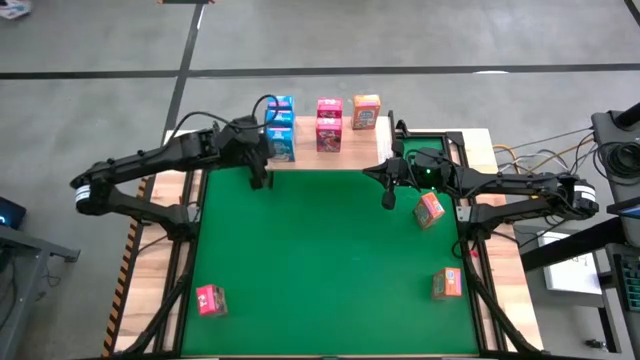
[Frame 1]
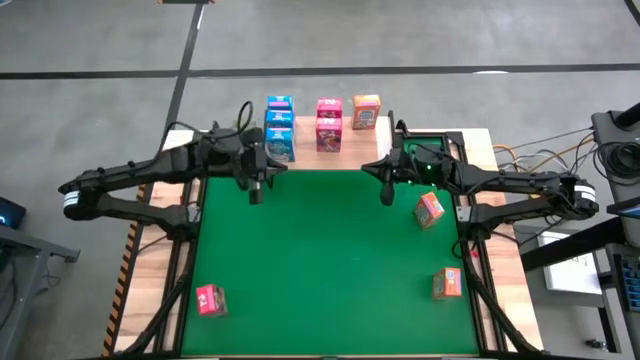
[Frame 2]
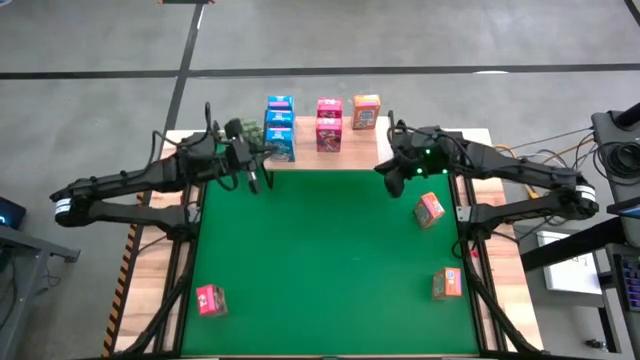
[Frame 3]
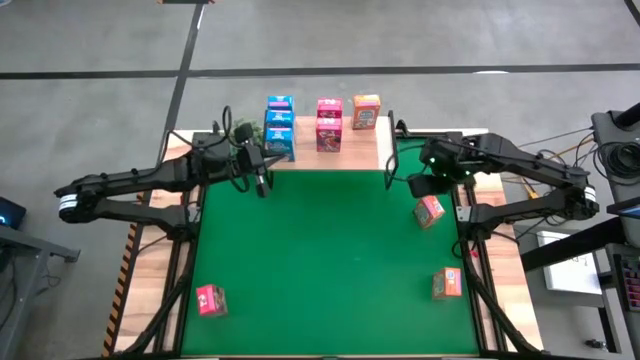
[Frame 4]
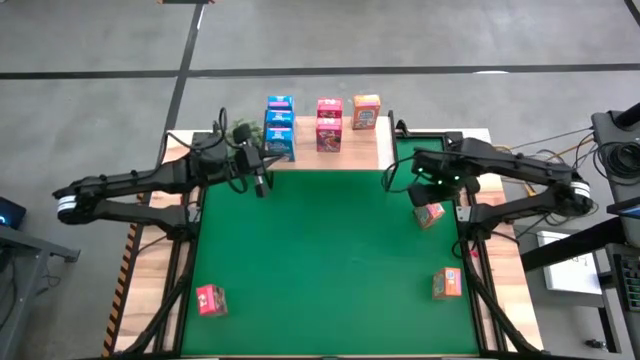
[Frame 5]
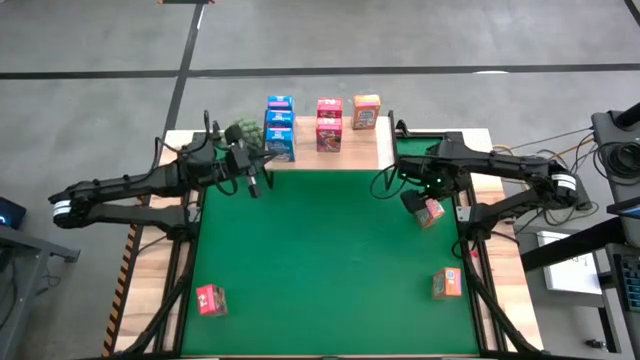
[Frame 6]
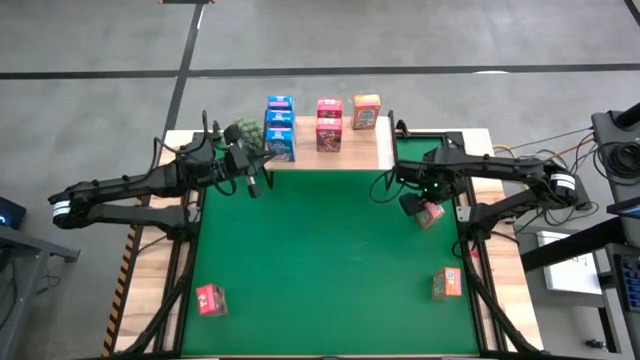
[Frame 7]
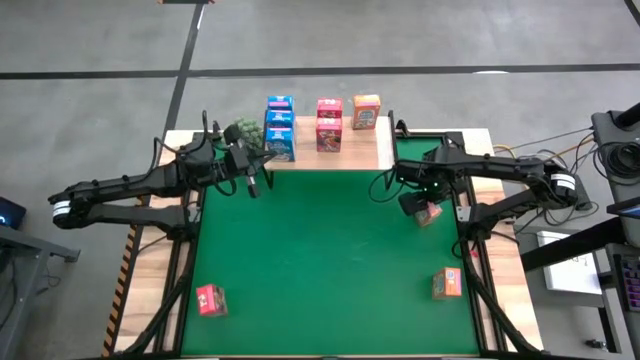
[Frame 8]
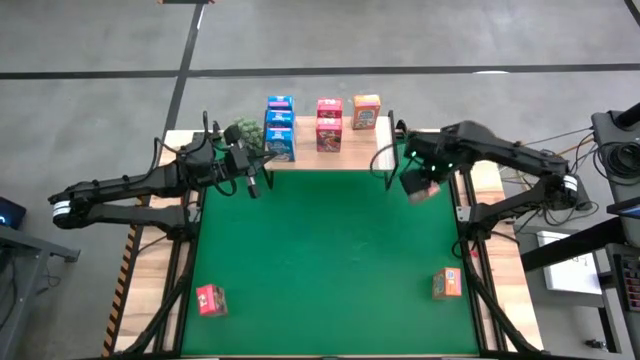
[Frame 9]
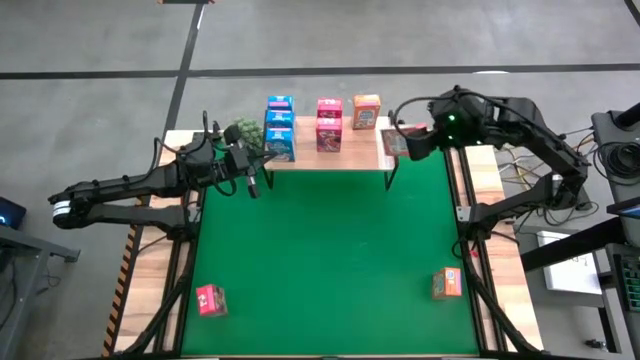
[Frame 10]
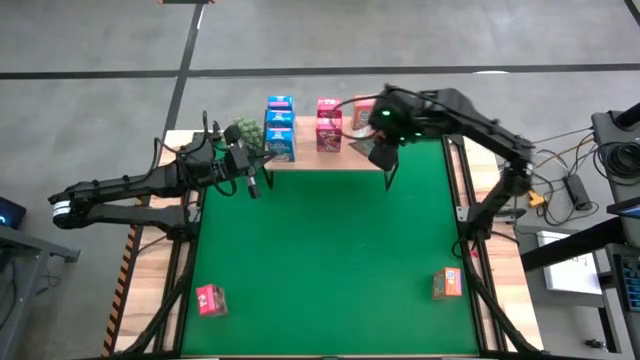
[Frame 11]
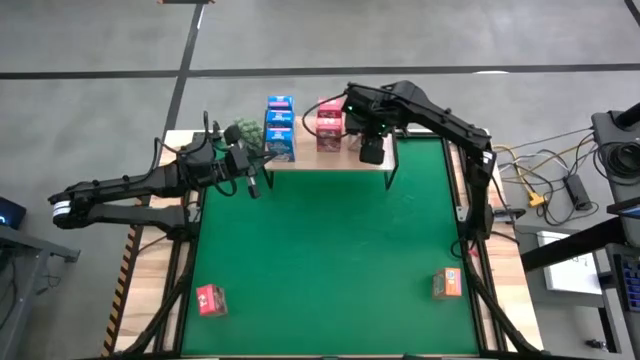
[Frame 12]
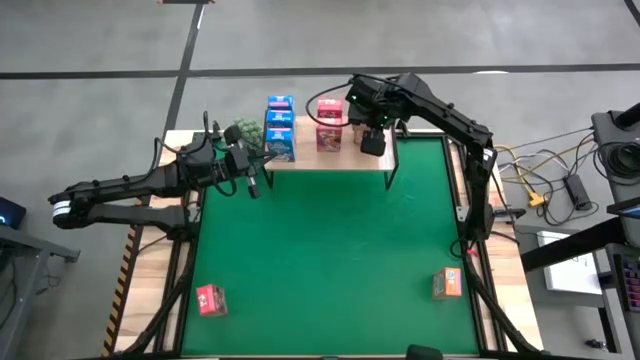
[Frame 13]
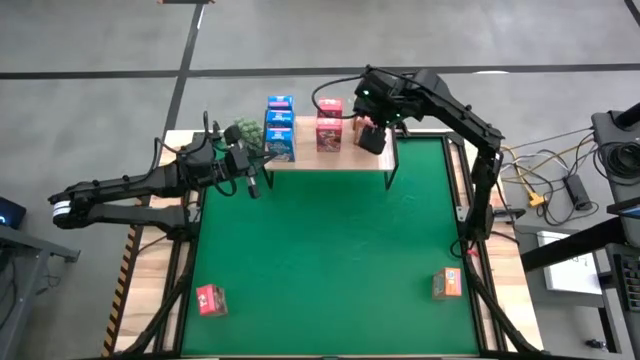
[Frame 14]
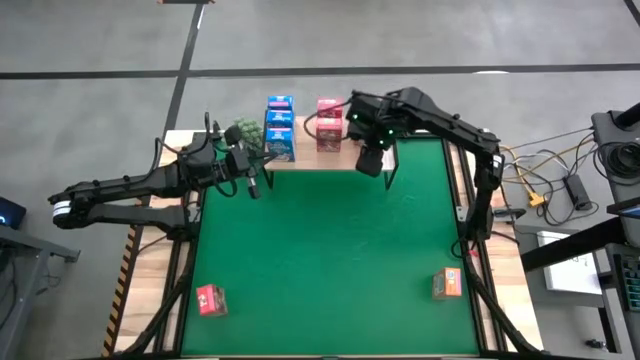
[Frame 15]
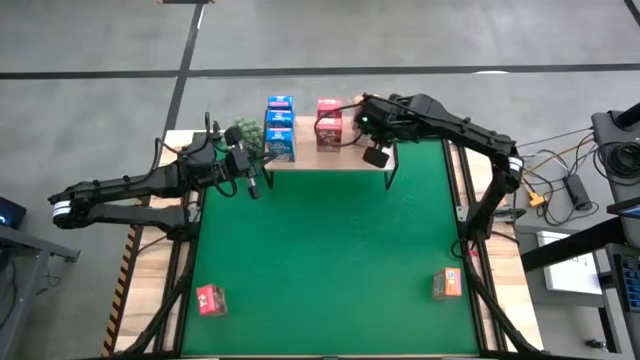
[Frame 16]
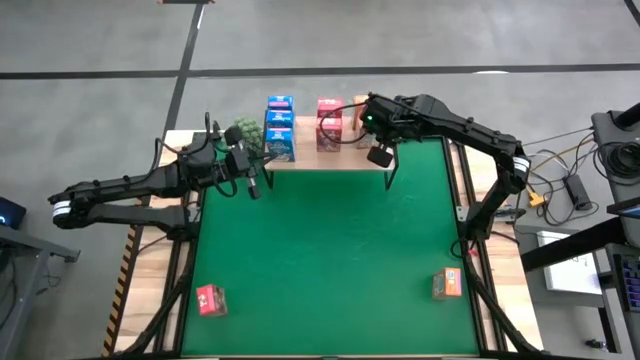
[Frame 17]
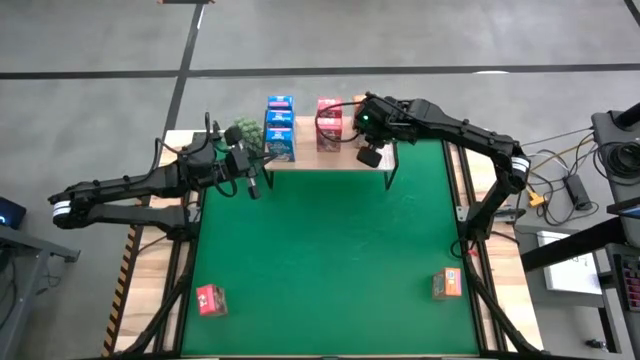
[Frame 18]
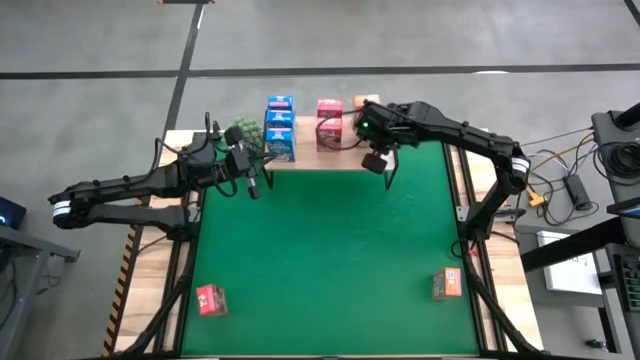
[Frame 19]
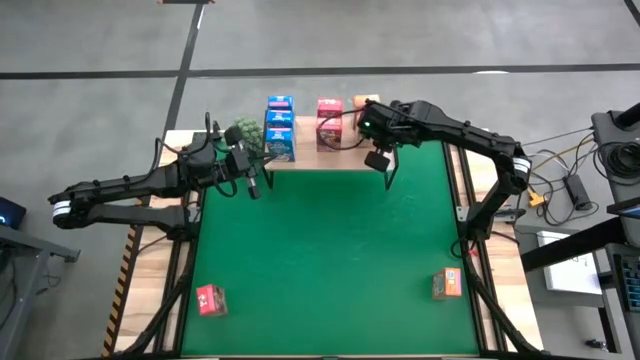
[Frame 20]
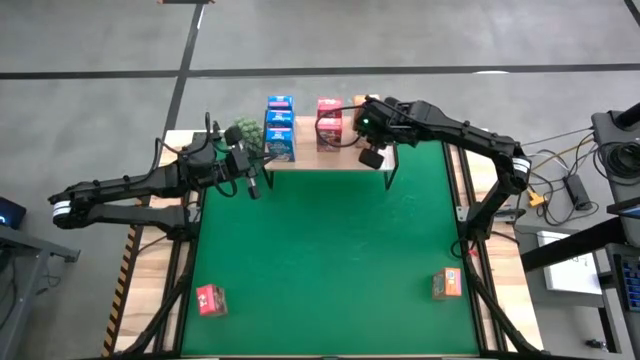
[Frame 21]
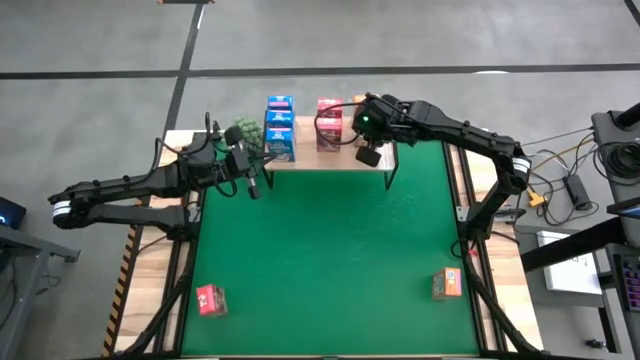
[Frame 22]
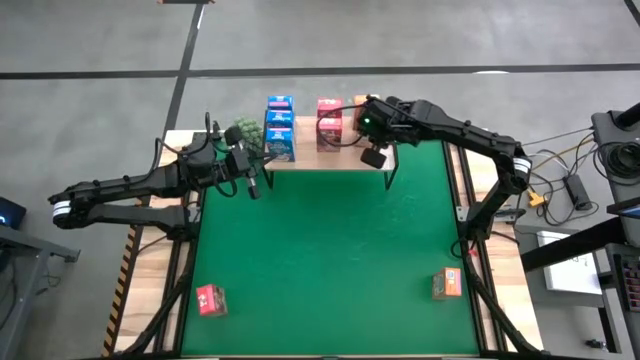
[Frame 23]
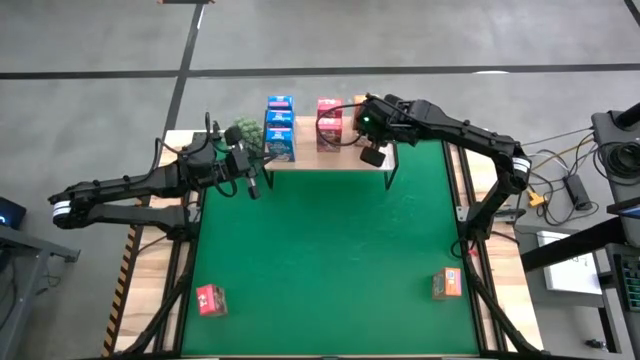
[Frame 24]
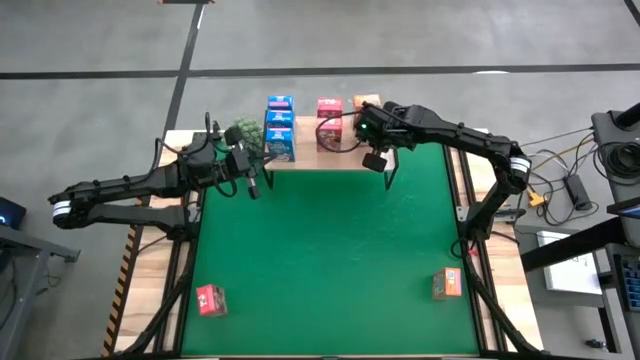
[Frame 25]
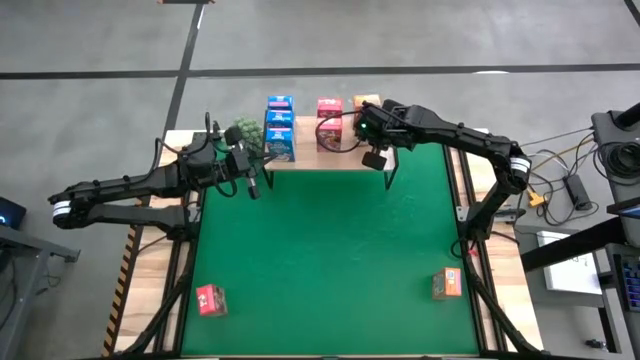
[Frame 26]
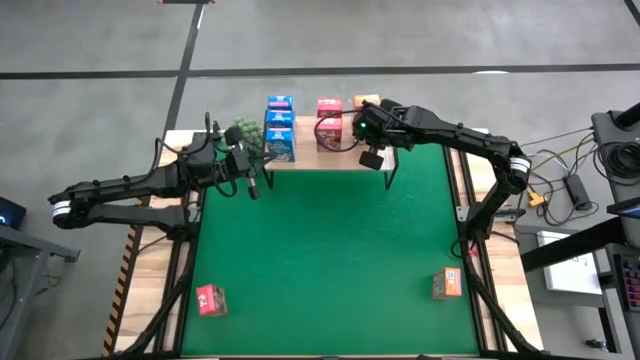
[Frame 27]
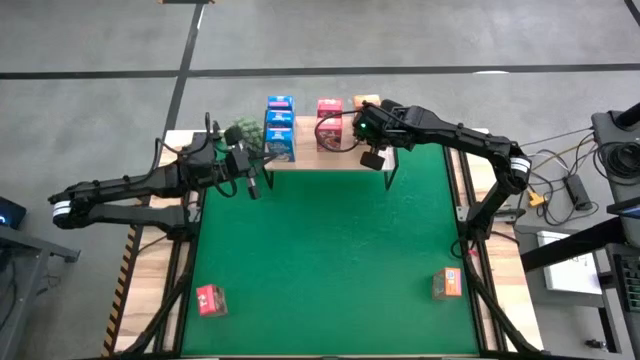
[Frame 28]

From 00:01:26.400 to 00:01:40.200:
Task: Stack cereal on shelf
Put the top orange cereal box on the shelf aligned with the other orange cereal box

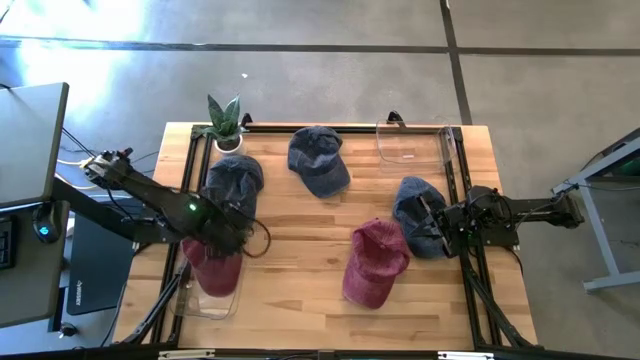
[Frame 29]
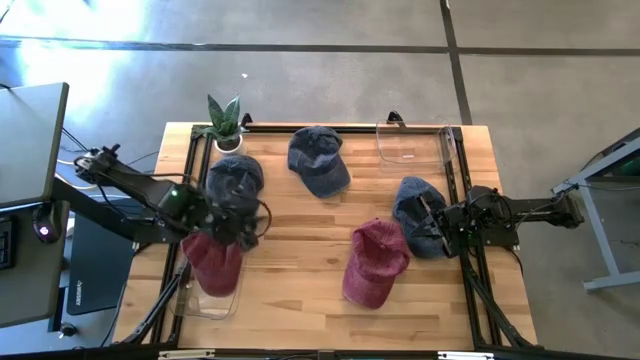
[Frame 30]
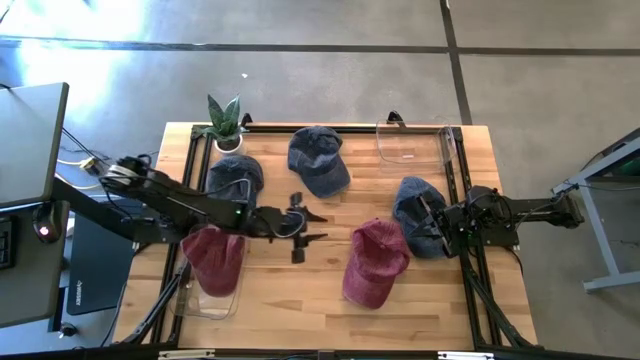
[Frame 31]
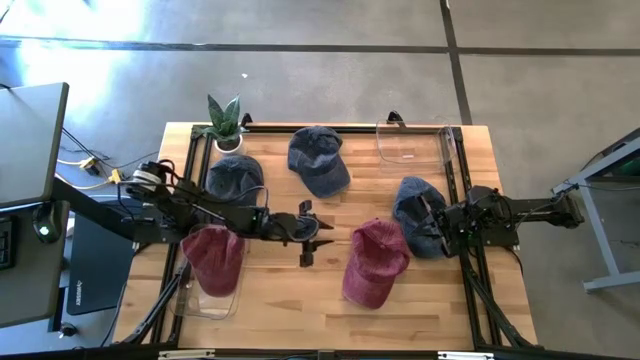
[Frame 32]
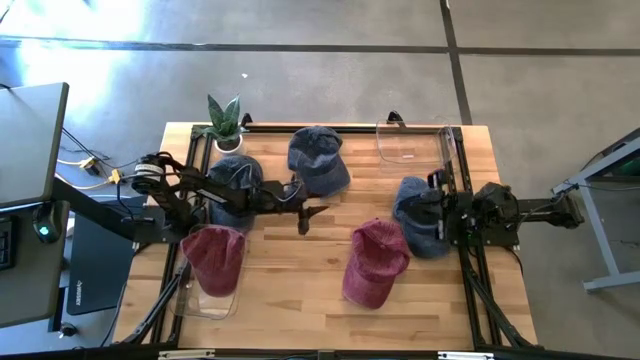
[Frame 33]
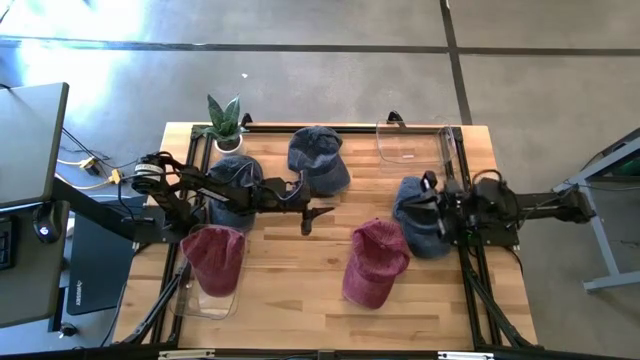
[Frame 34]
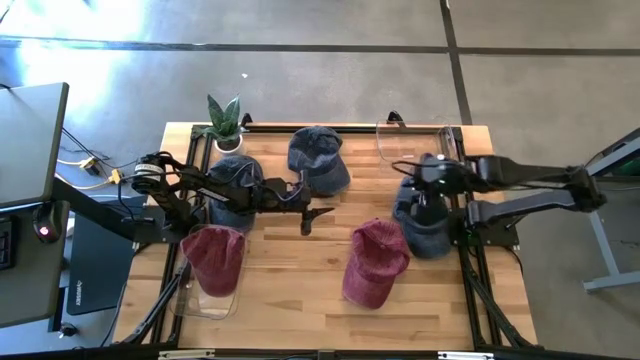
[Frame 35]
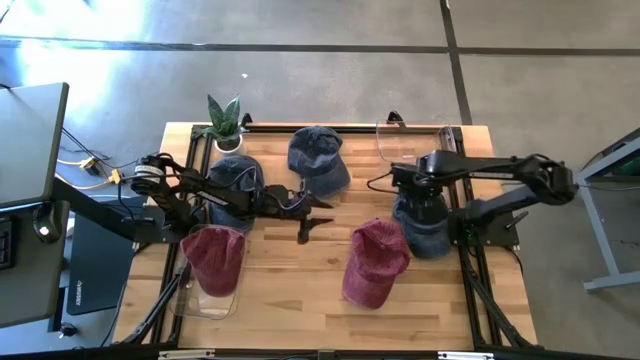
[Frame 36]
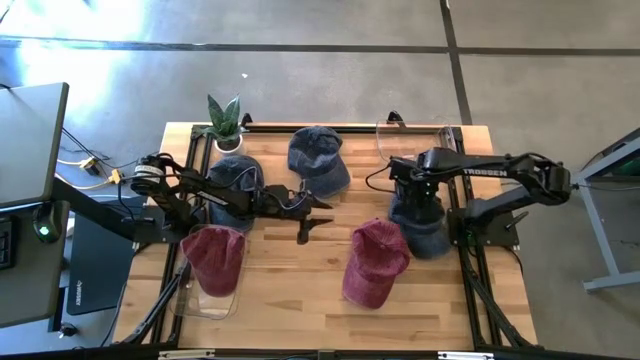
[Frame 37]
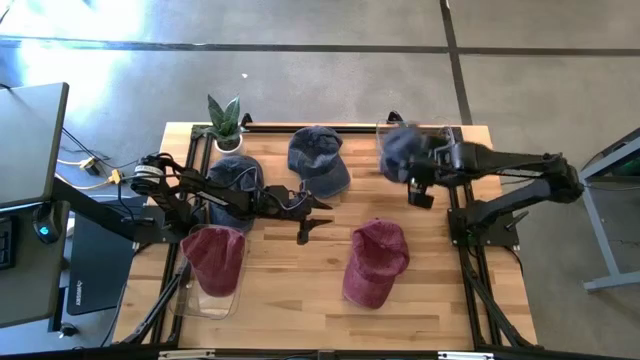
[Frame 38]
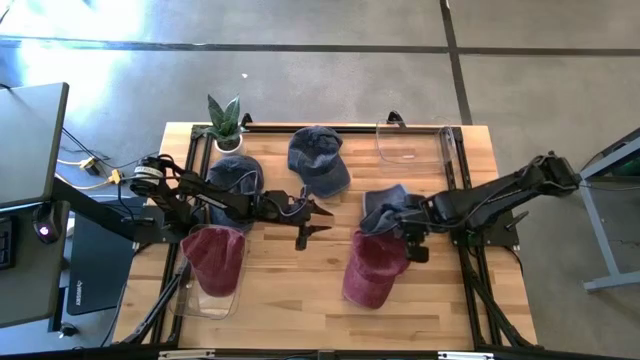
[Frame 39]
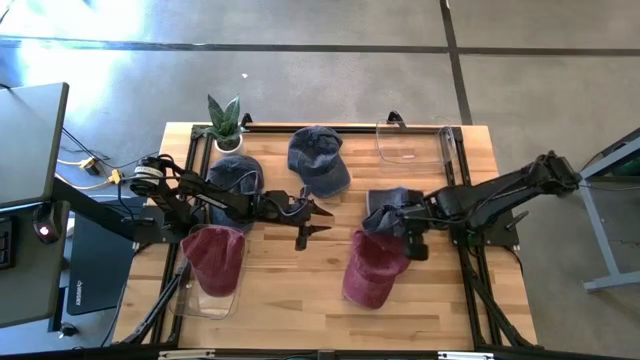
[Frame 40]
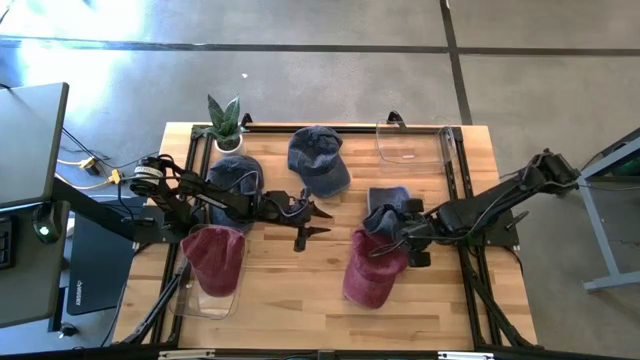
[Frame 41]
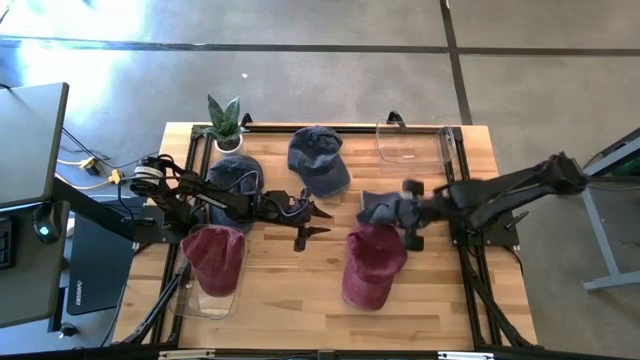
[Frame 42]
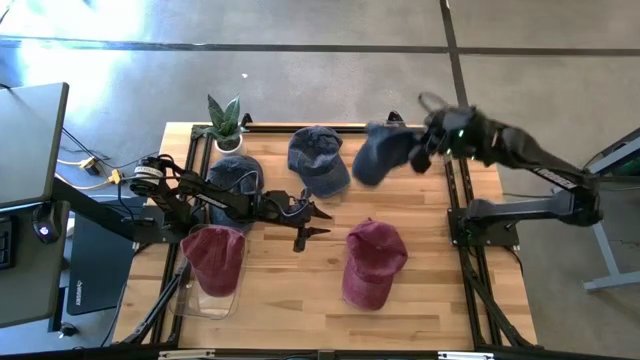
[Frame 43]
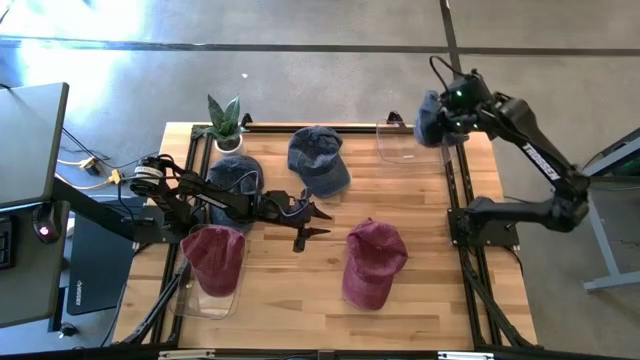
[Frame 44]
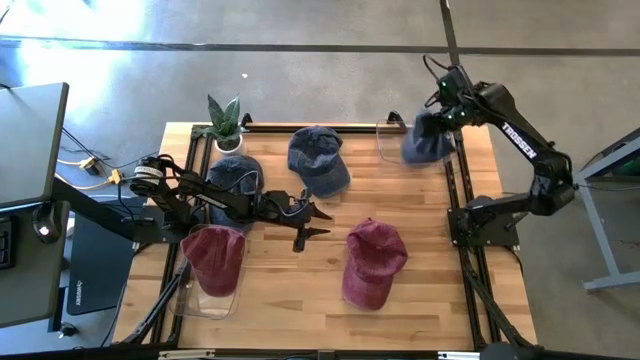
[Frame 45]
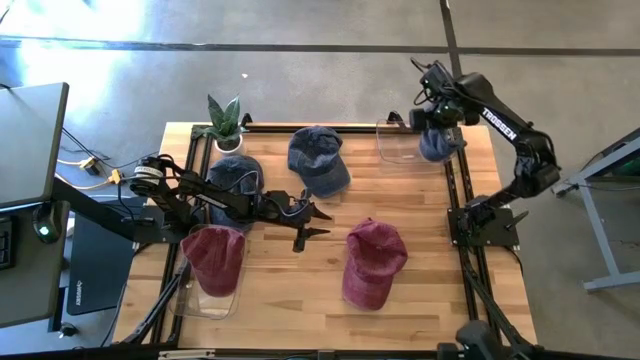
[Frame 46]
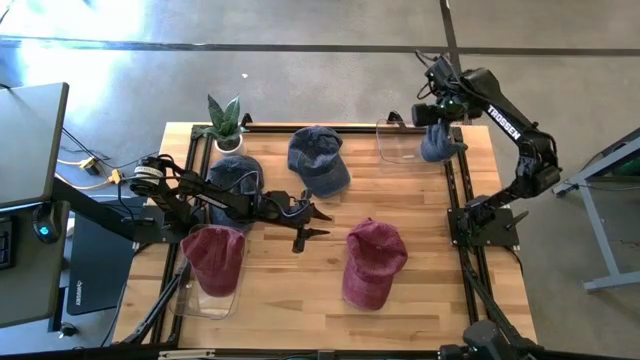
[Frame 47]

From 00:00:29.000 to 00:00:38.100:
Task: Pick & Place hat
Put the bottom right dark blue cap into the top transparent bin
